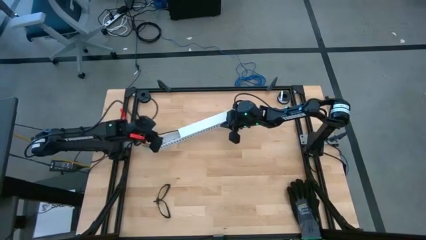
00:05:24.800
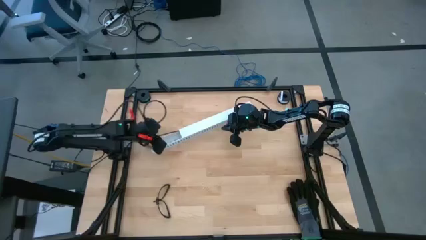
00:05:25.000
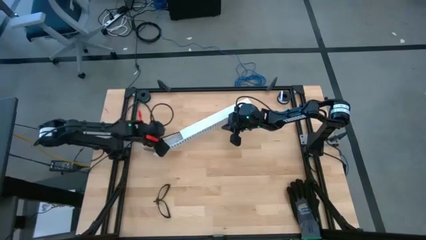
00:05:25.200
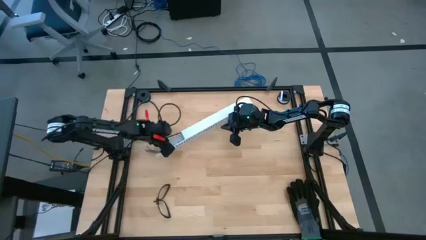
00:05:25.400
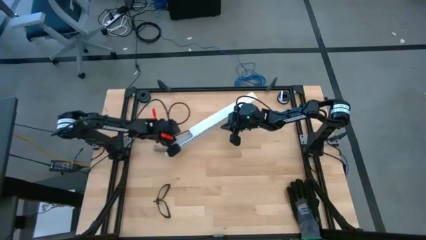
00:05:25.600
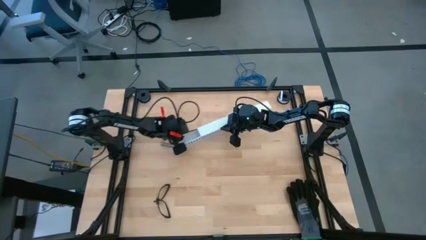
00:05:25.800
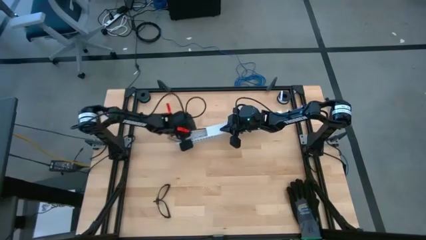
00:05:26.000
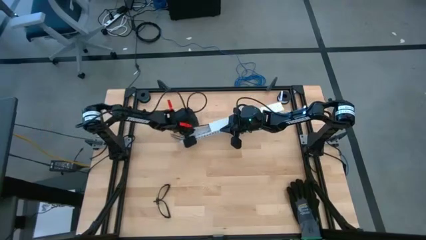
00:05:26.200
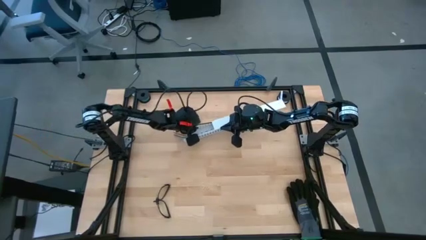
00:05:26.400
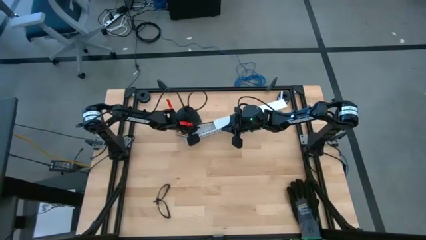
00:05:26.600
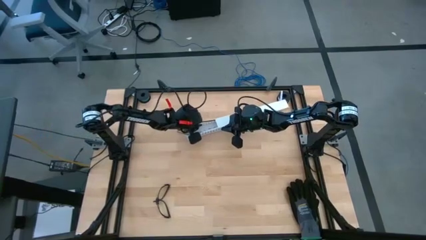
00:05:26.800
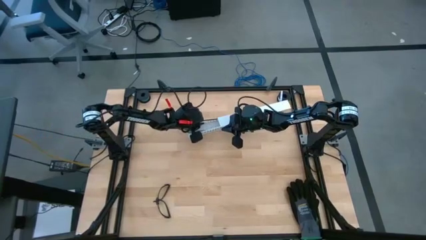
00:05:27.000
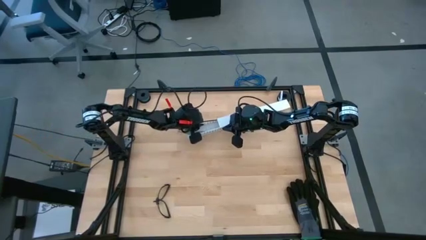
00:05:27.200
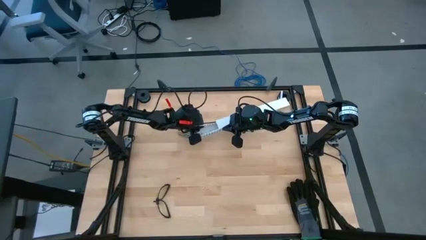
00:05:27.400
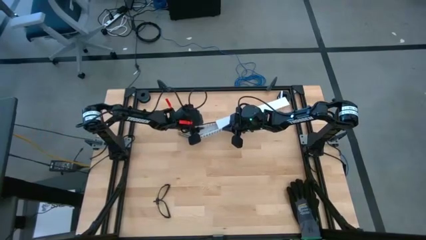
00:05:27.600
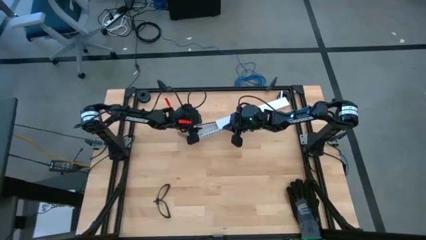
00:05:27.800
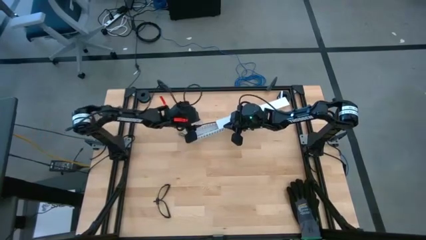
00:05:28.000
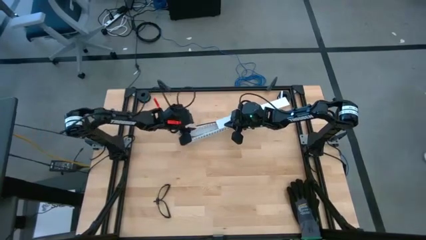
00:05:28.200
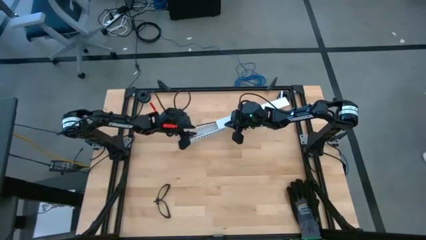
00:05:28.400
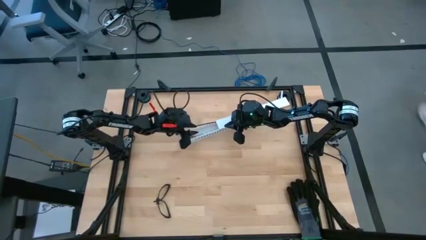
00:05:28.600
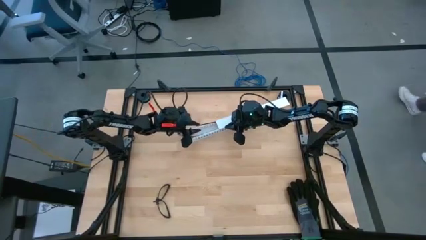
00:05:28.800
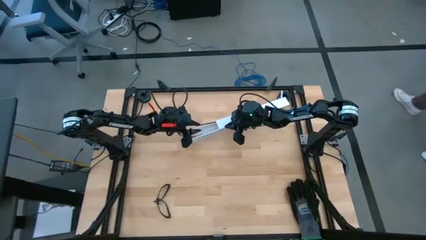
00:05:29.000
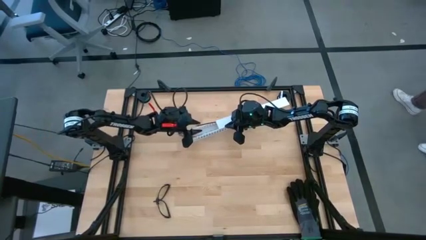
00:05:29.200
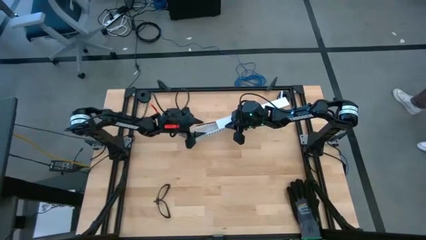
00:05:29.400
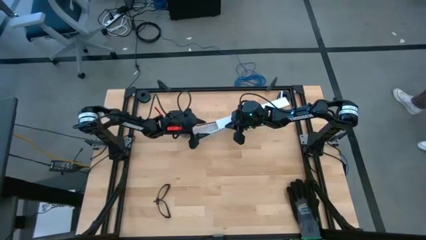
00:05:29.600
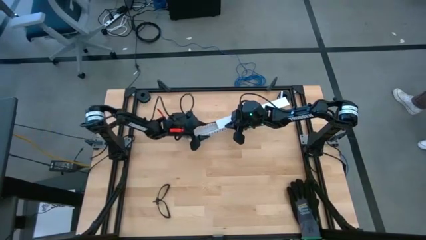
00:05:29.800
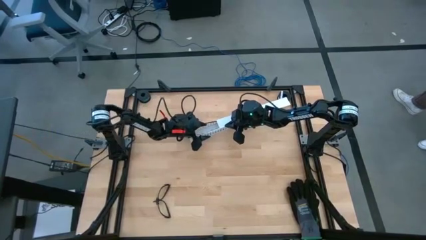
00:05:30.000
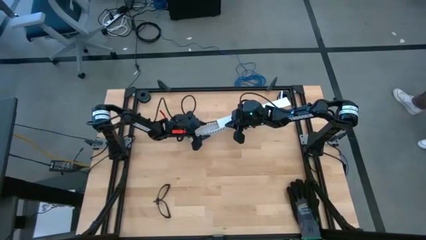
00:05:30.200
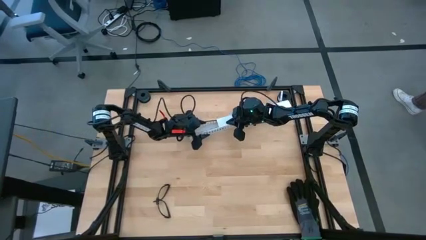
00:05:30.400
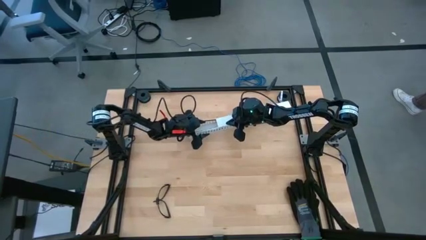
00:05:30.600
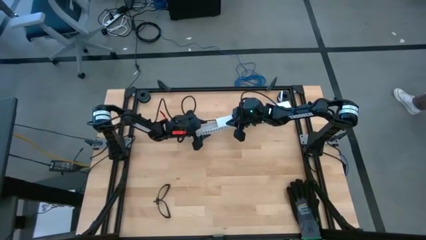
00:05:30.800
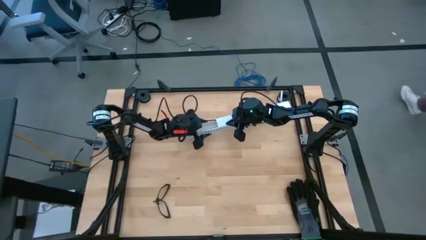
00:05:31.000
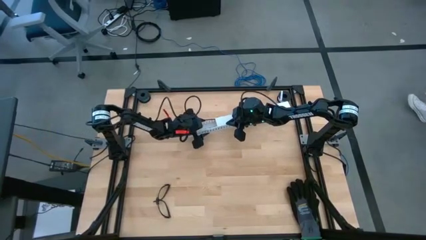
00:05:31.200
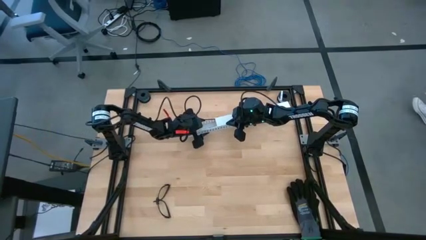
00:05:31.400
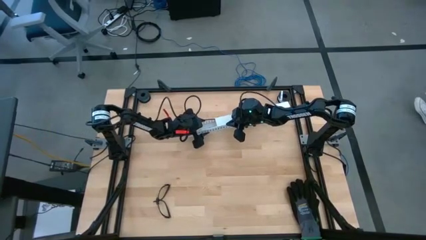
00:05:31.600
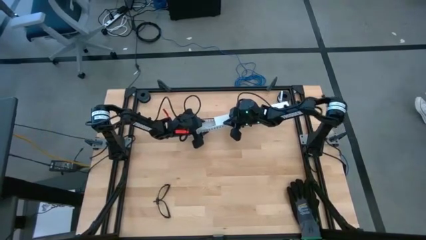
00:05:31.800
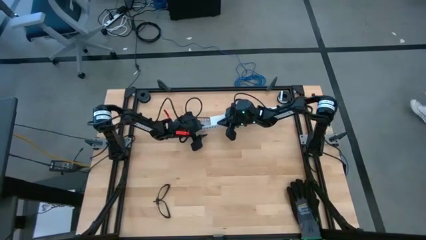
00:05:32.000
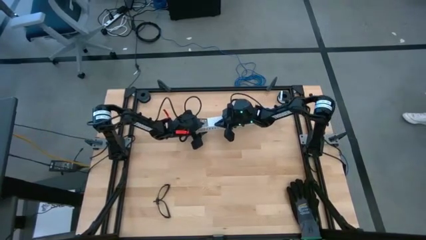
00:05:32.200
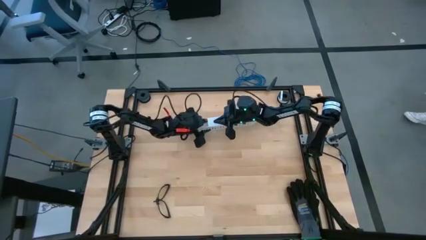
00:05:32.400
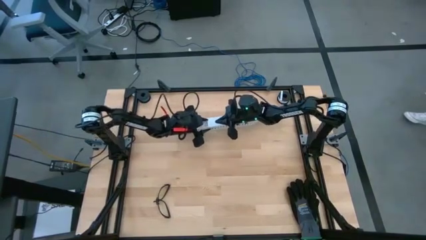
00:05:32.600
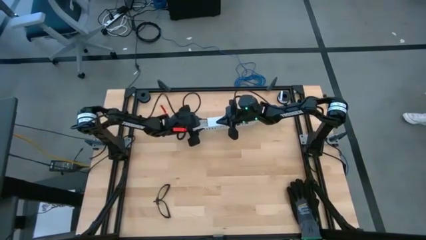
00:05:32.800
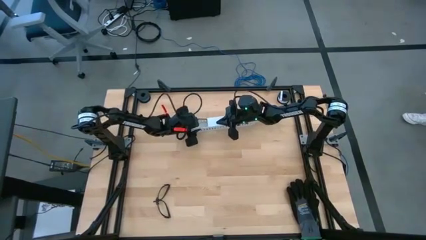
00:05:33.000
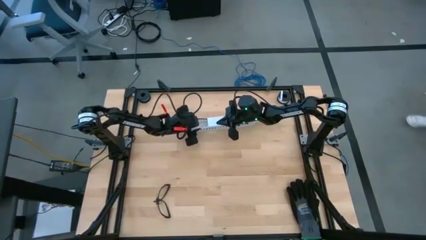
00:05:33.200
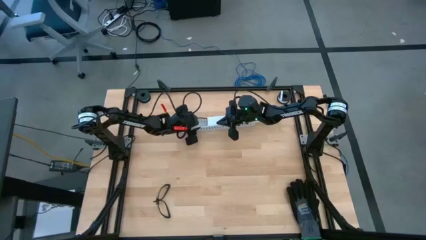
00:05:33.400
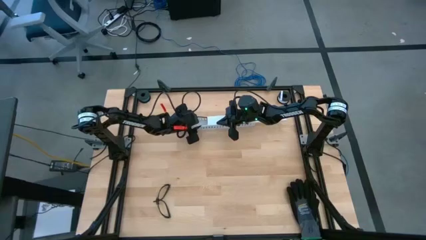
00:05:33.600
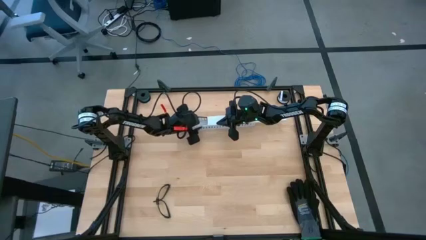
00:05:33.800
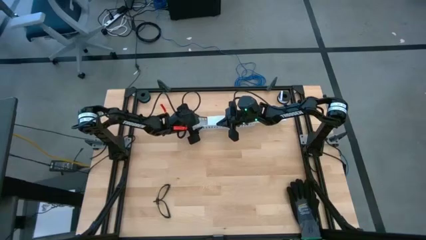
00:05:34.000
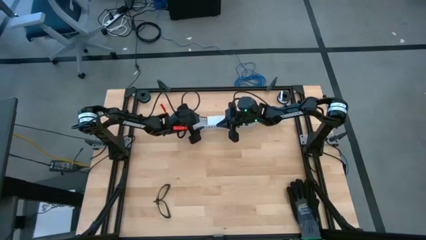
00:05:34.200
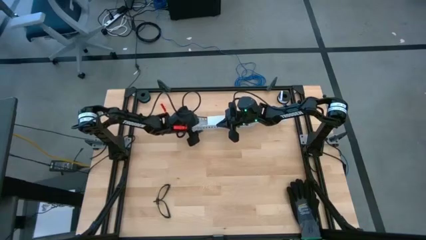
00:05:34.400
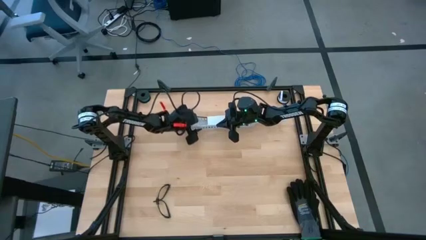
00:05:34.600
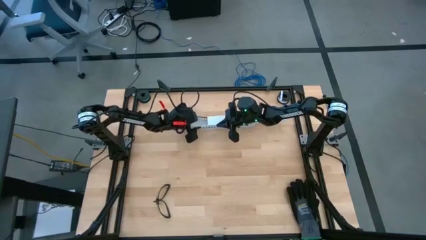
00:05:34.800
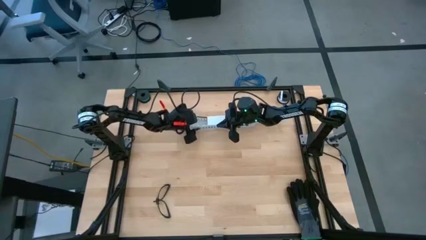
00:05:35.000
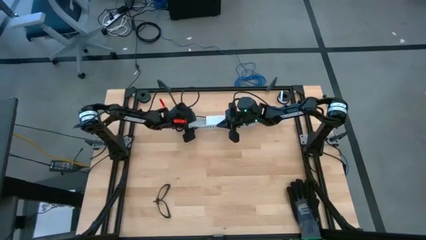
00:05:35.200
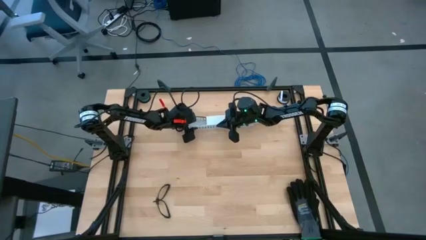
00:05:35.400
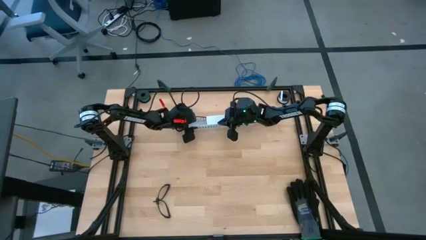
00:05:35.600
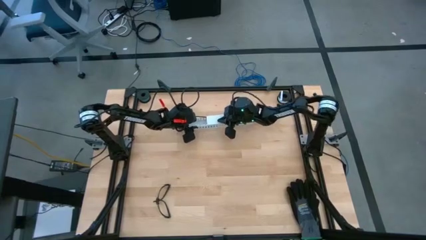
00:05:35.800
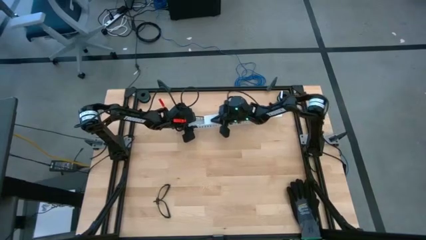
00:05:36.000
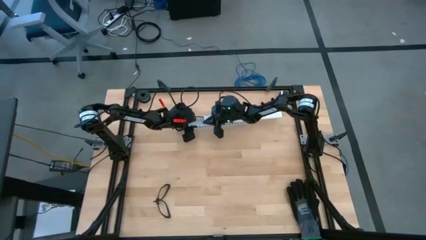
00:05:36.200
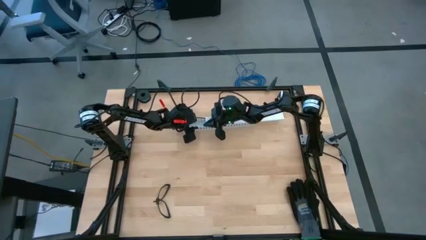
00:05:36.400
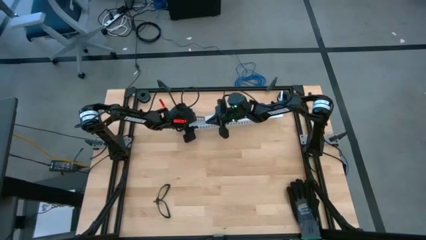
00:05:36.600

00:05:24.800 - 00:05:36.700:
Task: Ziptie cables
Close the white cable duct lid
